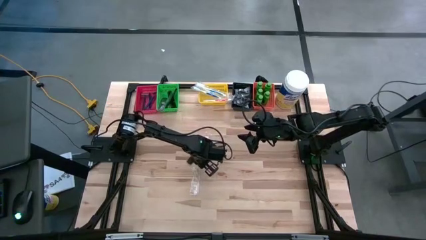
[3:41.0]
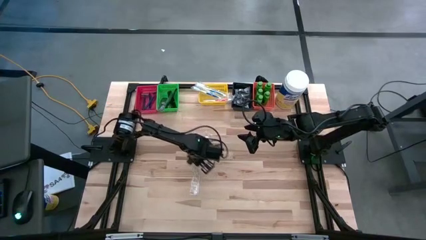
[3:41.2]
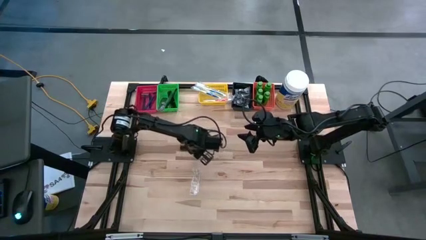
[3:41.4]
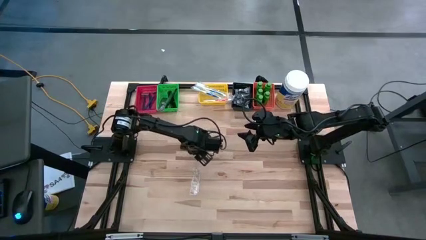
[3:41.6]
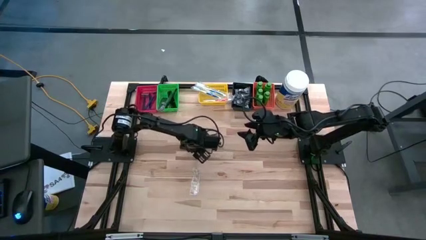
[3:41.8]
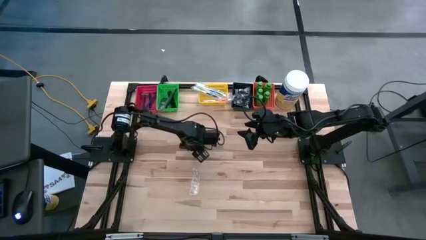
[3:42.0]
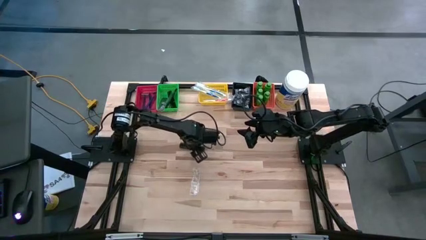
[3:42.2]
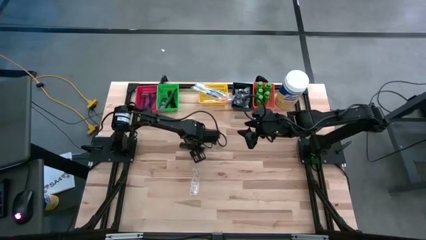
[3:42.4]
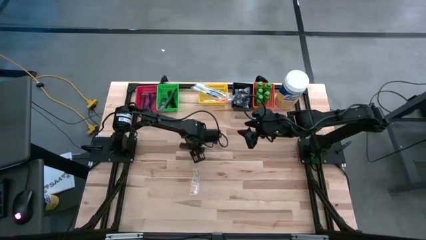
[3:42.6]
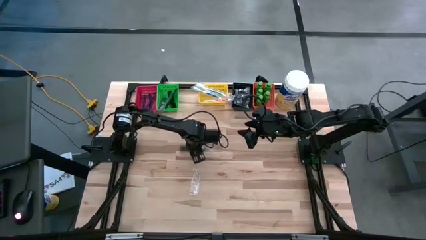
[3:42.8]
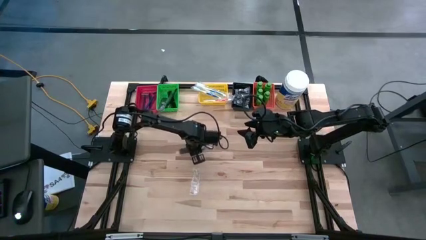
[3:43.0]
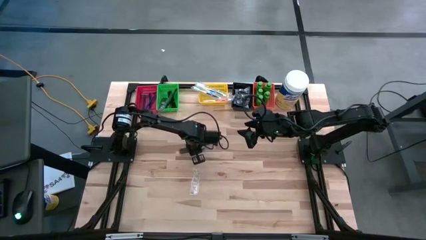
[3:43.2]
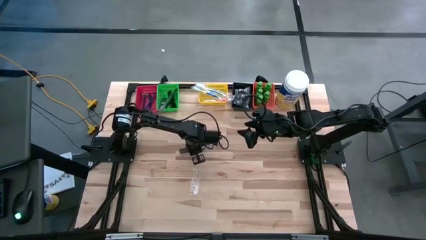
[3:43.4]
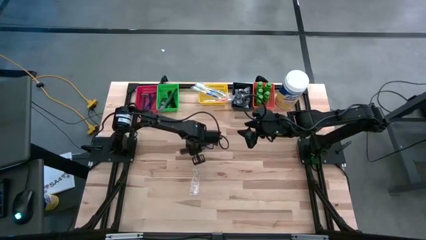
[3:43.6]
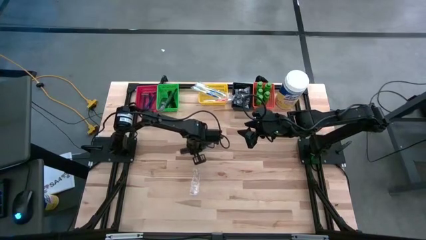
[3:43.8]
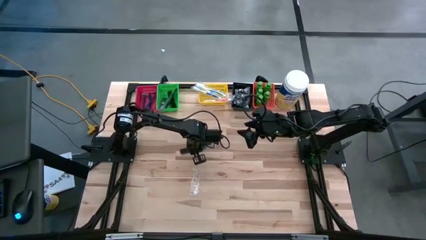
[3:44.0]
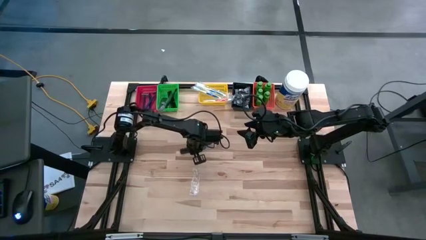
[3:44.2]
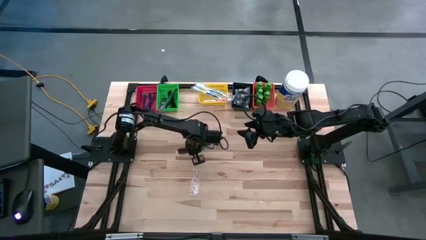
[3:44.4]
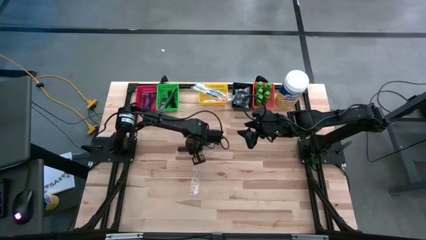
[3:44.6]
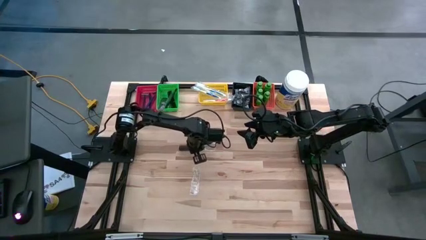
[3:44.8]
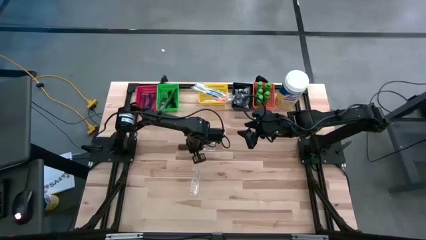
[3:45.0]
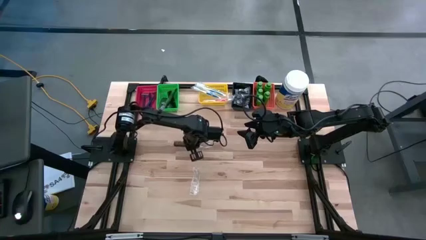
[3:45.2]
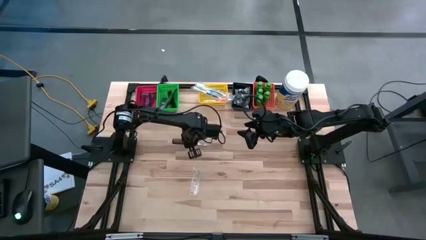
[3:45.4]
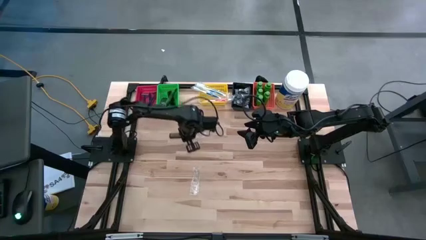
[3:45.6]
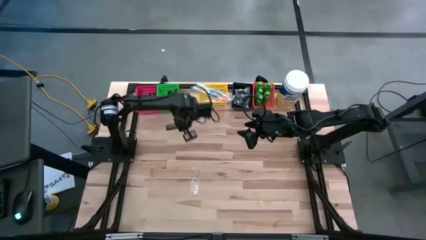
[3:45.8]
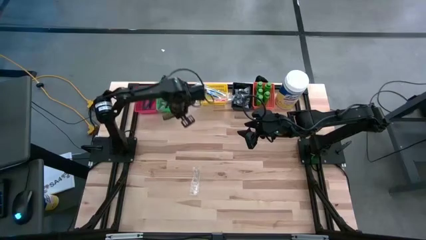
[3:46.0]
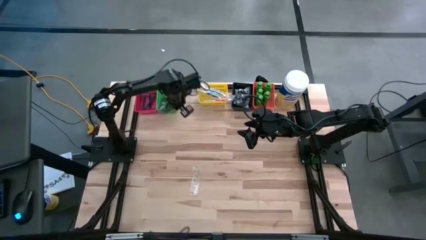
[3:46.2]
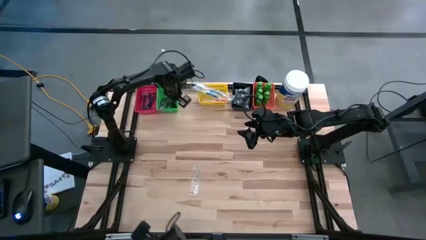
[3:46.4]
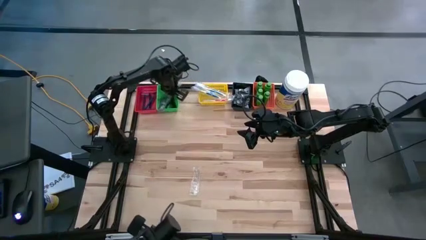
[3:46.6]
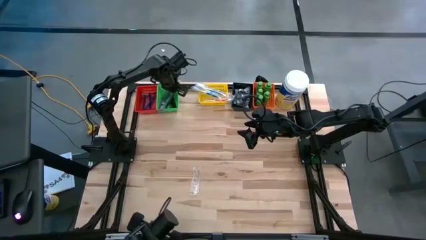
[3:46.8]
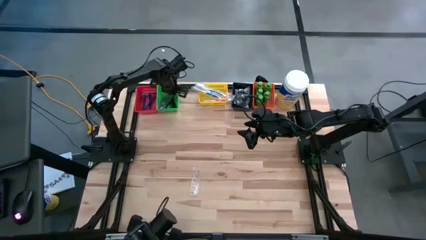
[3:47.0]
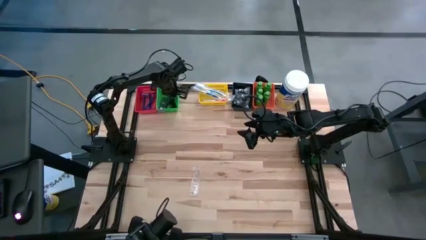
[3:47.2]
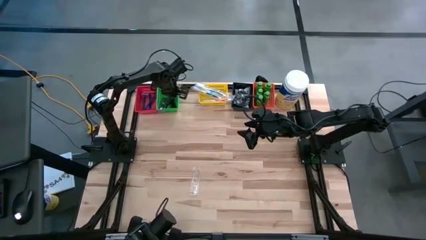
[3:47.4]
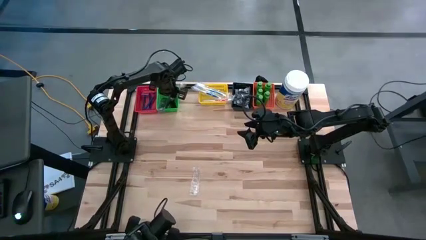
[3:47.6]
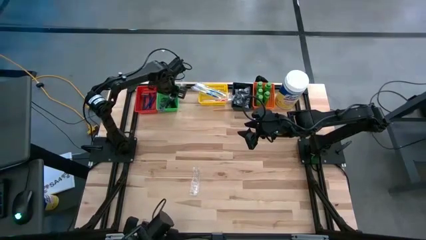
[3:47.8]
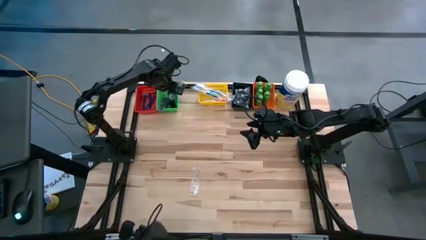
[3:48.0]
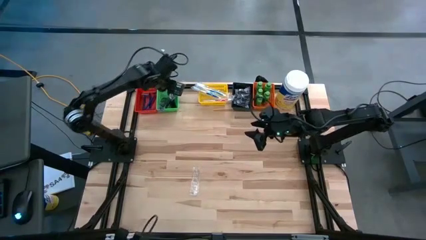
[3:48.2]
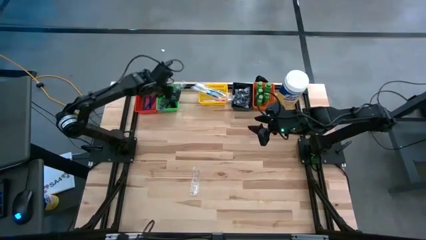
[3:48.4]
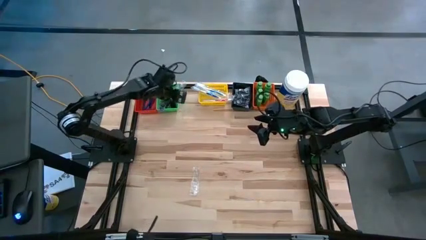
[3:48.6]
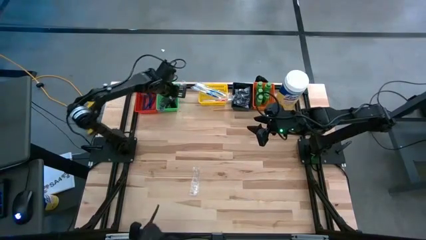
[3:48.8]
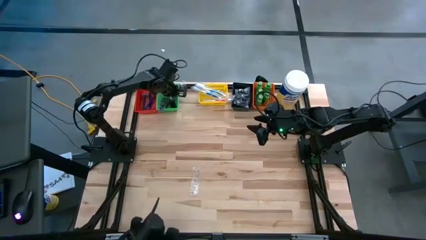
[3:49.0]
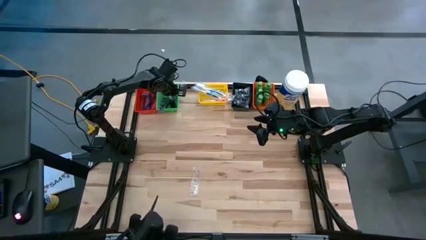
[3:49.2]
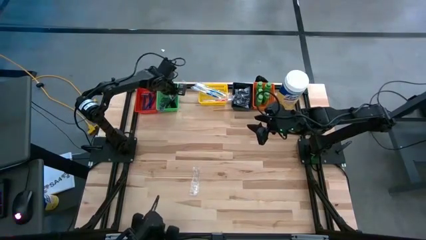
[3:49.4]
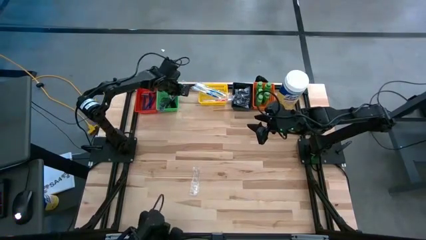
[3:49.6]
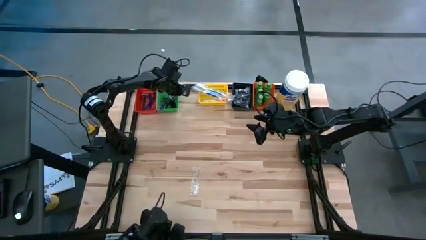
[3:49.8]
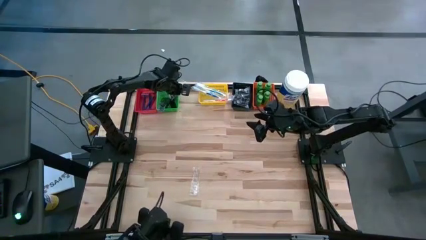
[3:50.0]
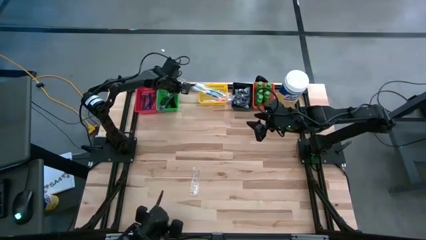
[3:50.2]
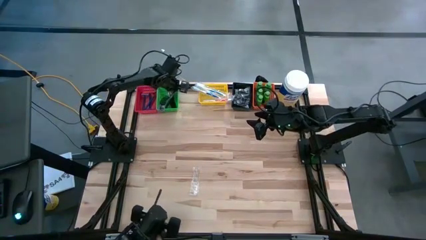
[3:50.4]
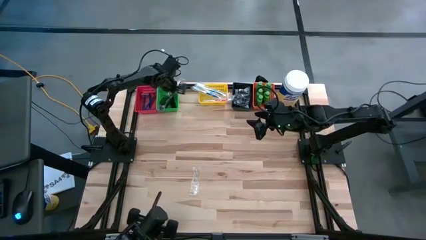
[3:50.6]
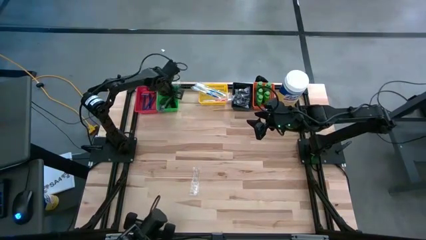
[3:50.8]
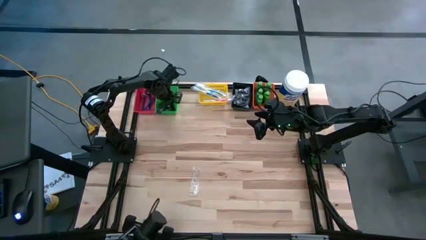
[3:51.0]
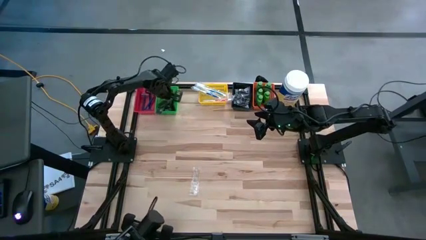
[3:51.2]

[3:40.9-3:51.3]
Task: Pick & Place Travel size toiletries
Put the black comb into the green bin

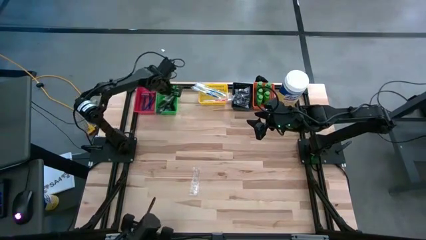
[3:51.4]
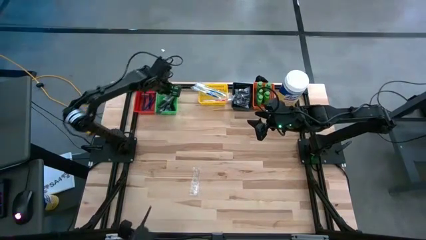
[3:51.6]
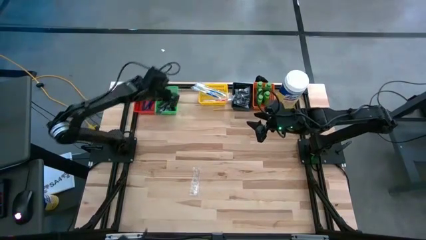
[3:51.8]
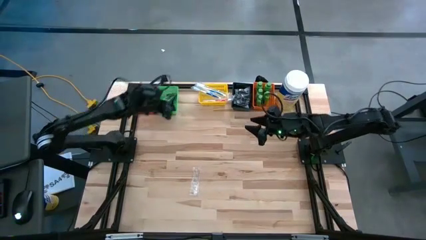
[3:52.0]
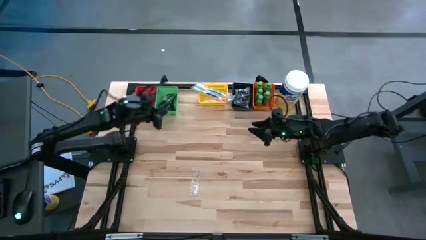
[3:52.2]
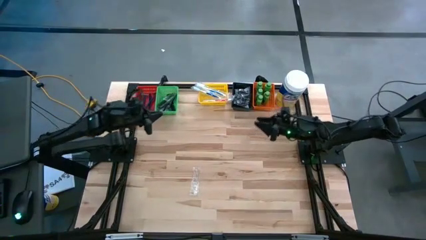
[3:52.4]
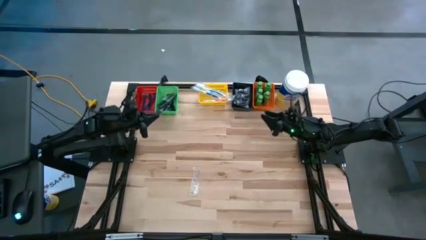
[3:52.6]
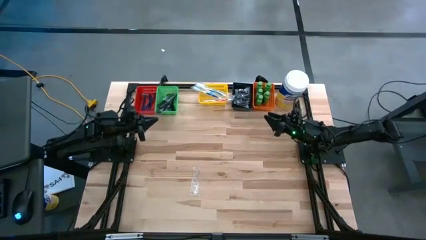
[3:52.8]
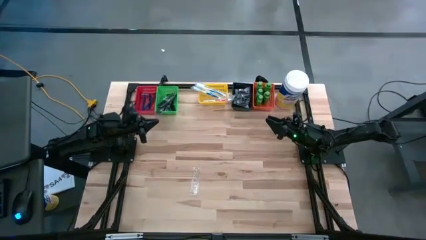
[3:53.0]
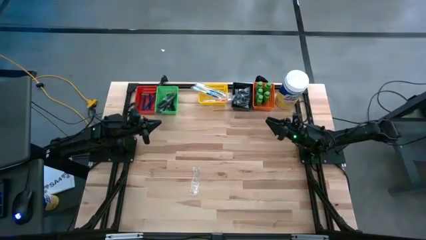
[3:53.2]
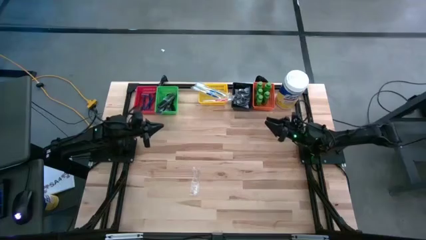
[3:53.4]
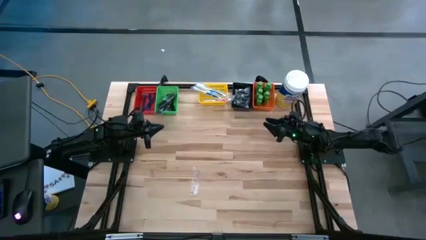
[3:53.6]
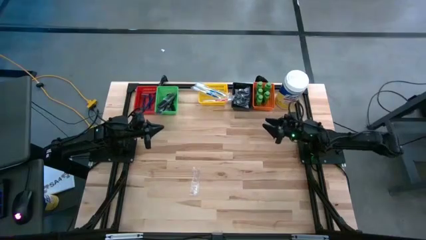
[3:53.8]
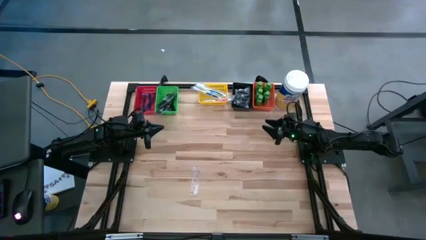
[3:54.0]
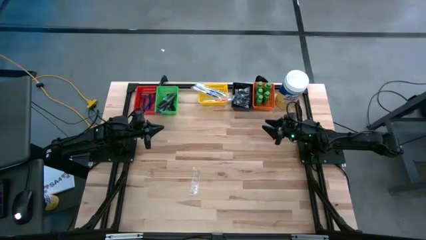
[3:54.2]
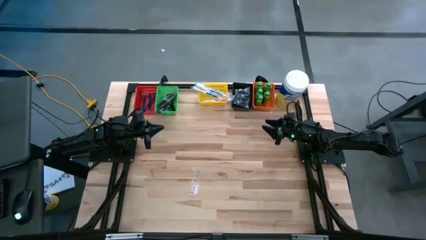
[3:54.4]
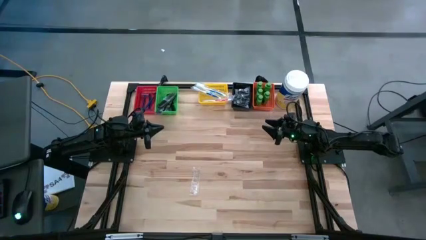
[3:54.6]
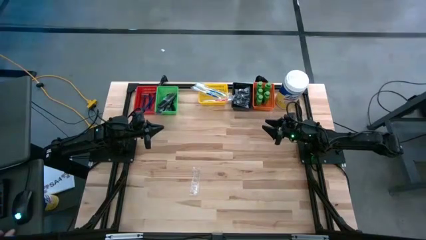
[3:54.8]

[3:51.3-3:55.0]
Return to Home Position

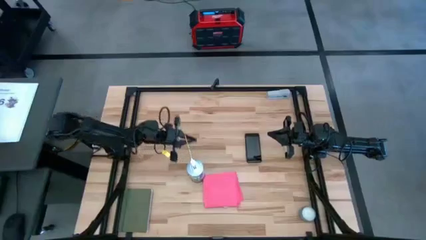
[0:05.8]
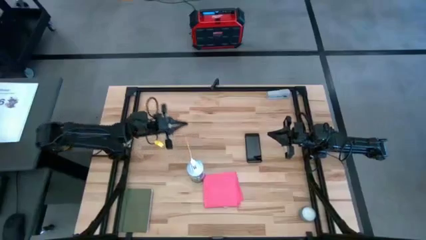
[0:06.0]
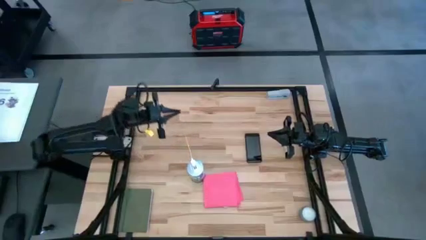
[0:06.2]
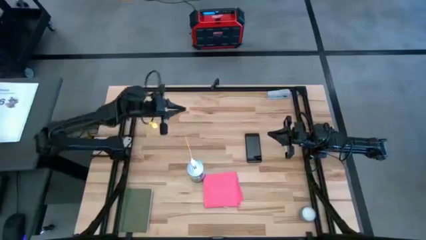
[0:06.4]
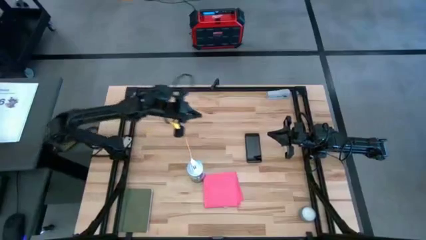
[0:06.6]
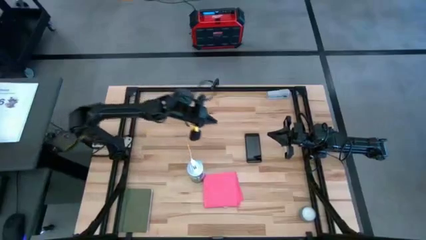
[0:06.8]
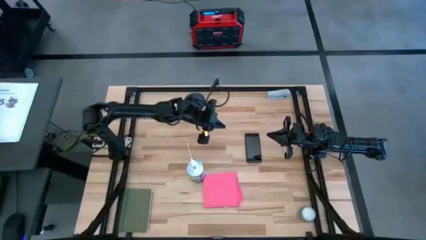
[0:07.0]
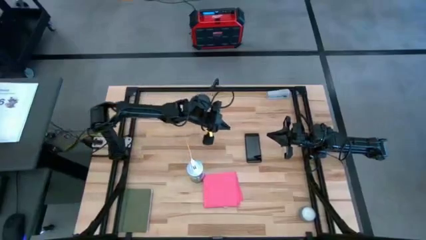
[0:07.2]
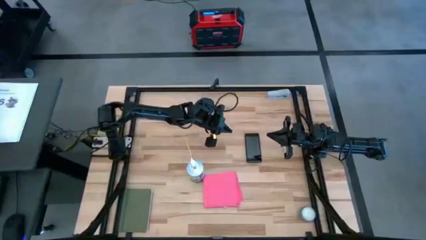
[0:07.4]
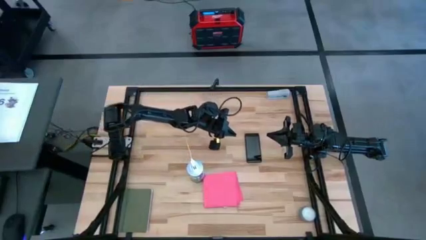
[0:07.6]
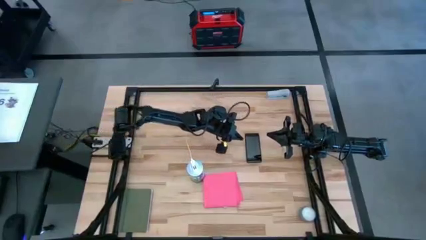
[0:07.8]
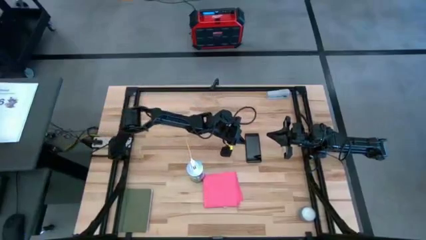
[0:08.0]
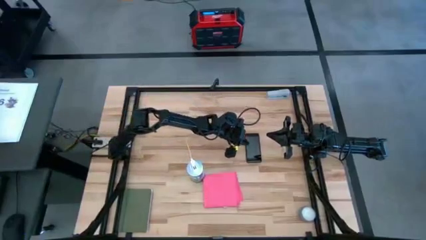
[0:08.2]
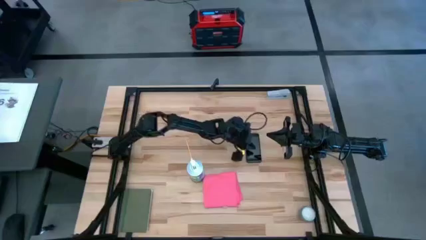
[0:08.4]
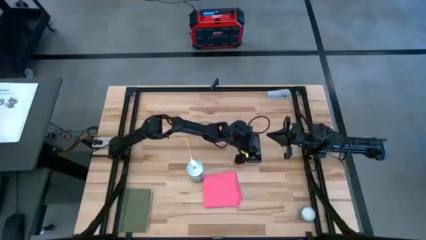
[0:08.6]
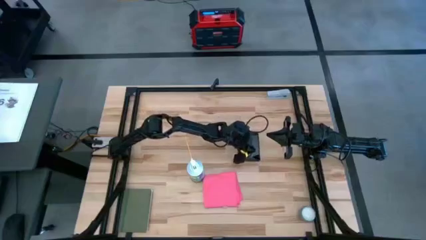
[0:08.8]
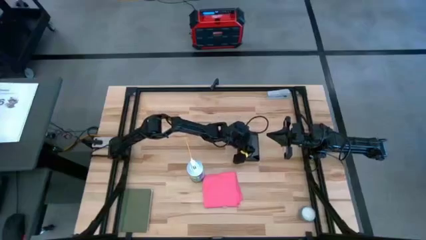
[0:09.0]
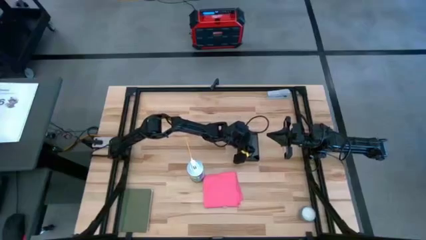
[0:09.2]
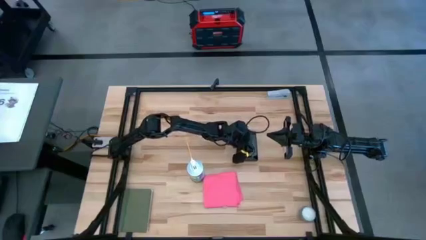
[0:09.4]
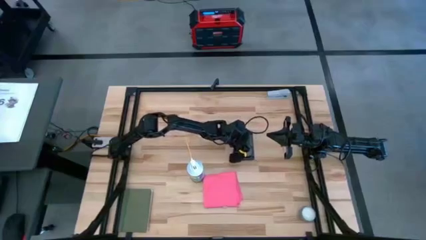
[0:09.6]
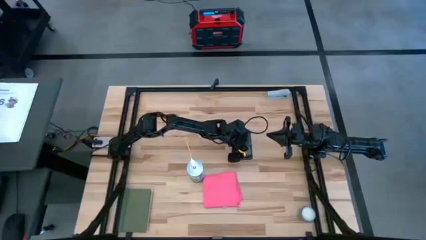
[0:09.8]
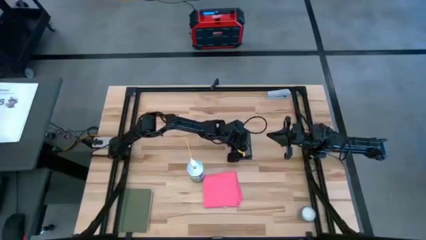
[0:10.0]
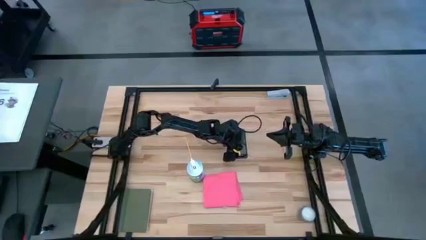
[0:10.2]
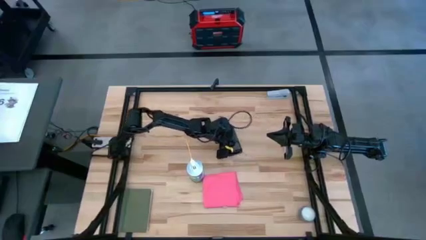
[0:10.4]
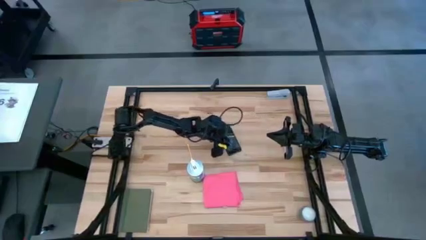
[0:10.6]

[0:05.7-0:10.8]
Task: Apply microfiber cloth
Adjust the black cellphone
